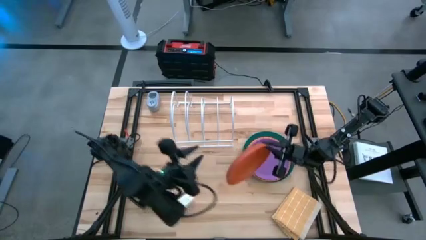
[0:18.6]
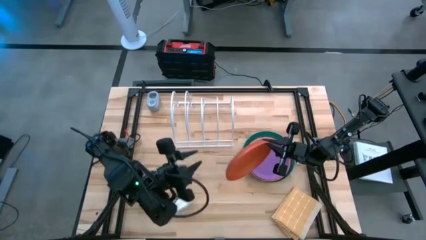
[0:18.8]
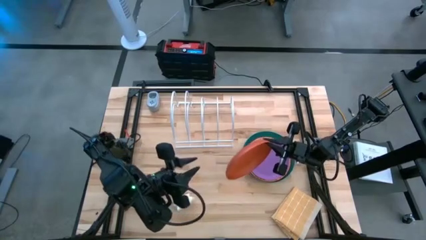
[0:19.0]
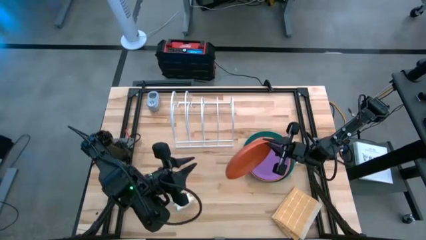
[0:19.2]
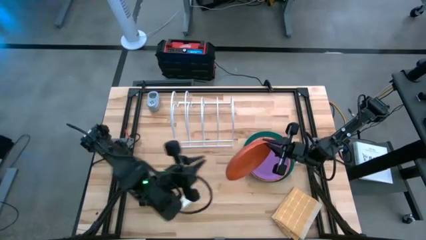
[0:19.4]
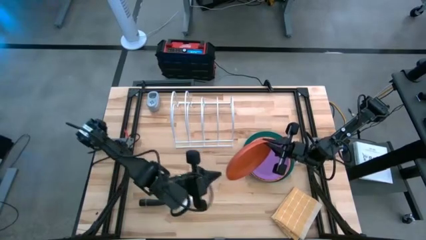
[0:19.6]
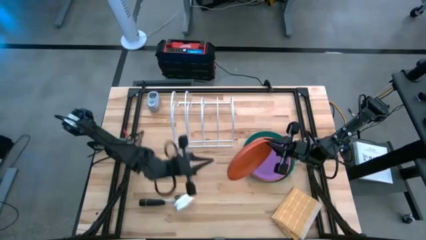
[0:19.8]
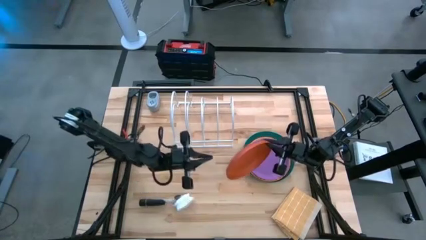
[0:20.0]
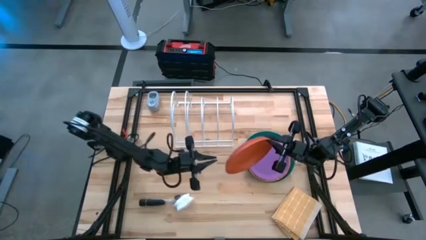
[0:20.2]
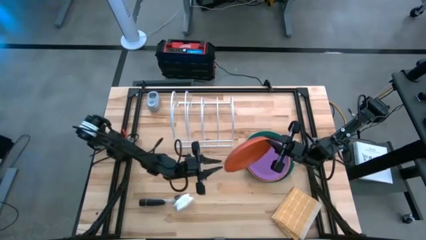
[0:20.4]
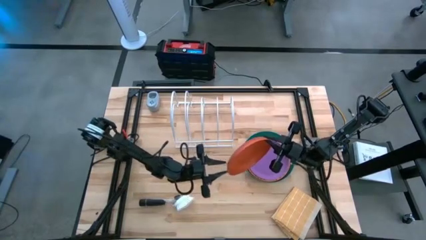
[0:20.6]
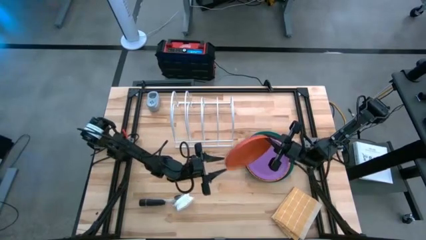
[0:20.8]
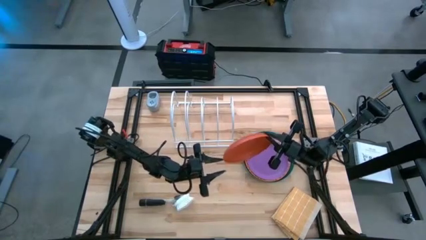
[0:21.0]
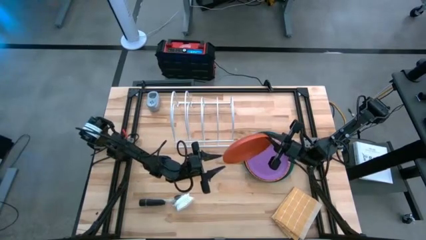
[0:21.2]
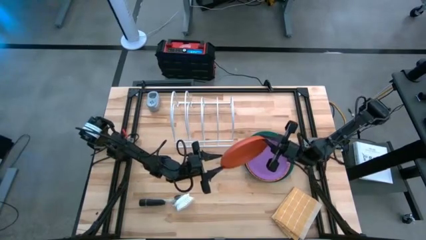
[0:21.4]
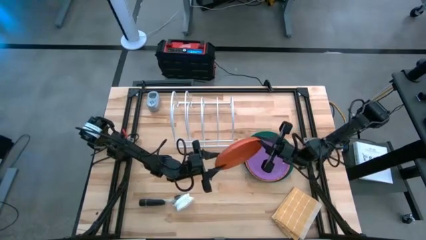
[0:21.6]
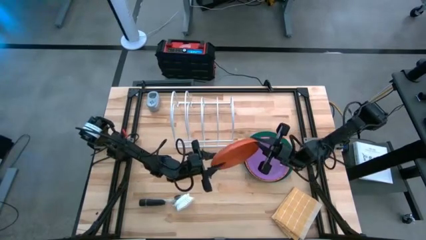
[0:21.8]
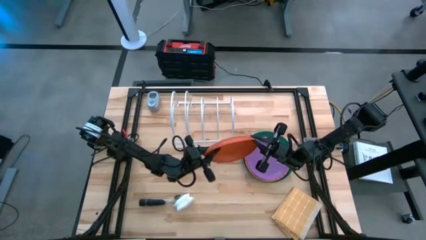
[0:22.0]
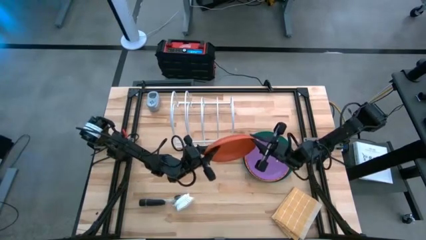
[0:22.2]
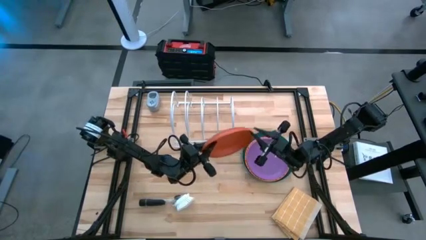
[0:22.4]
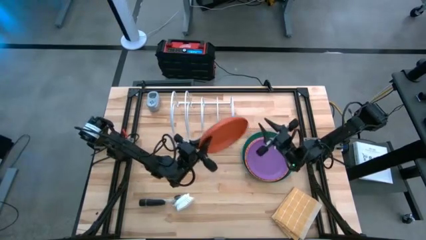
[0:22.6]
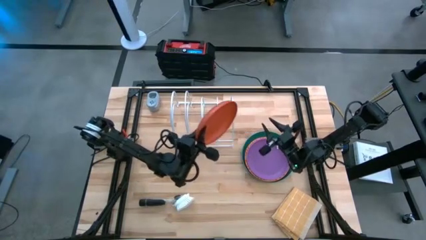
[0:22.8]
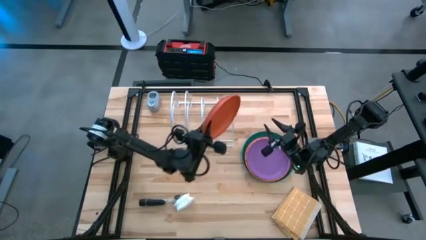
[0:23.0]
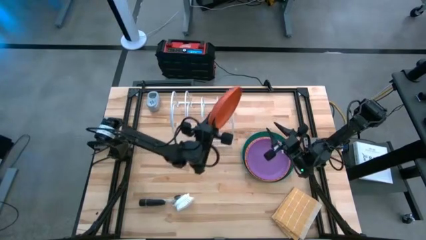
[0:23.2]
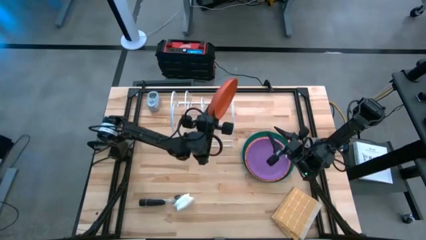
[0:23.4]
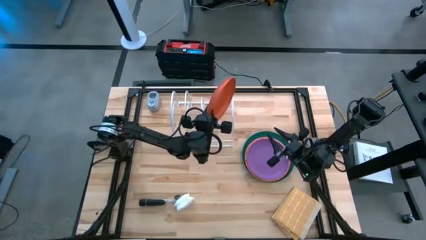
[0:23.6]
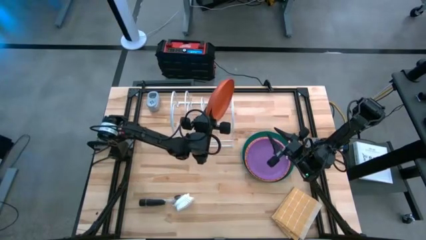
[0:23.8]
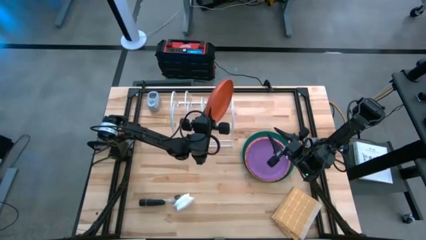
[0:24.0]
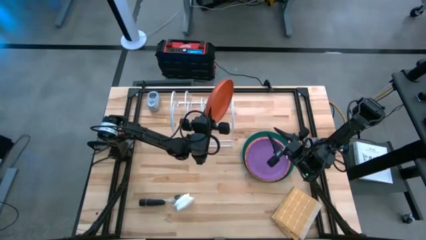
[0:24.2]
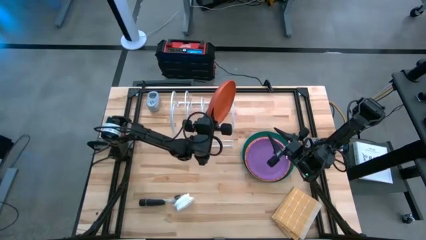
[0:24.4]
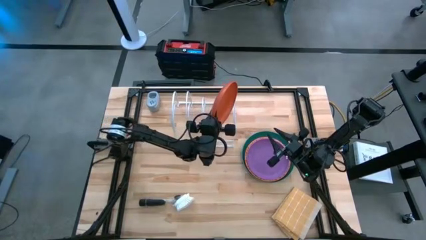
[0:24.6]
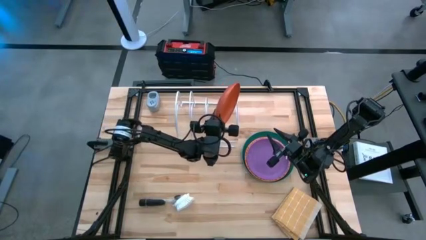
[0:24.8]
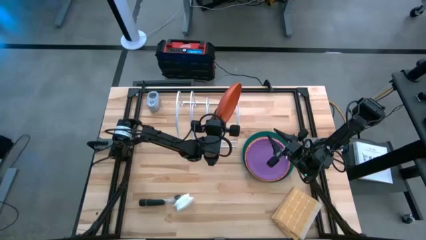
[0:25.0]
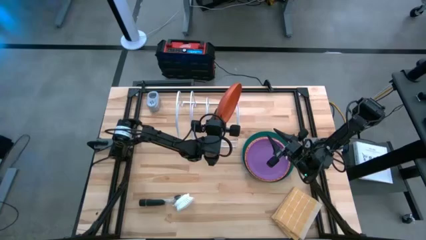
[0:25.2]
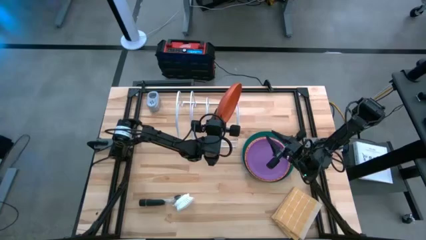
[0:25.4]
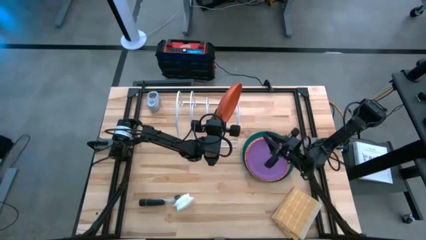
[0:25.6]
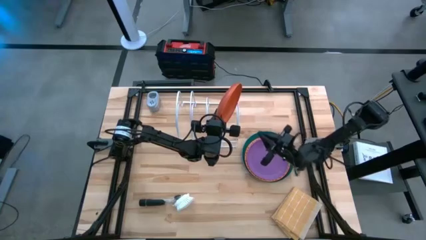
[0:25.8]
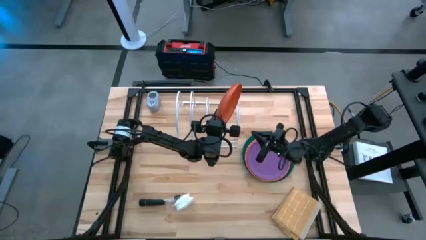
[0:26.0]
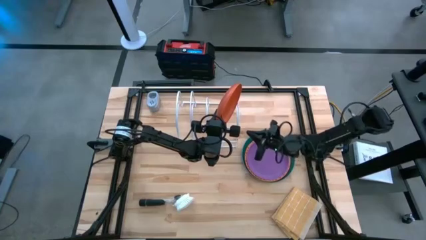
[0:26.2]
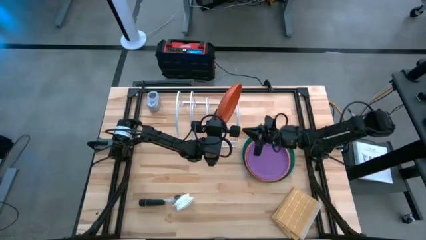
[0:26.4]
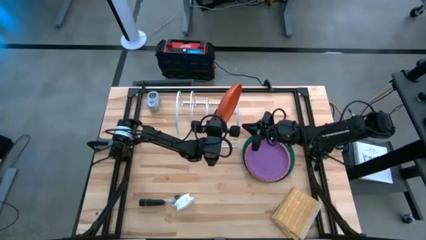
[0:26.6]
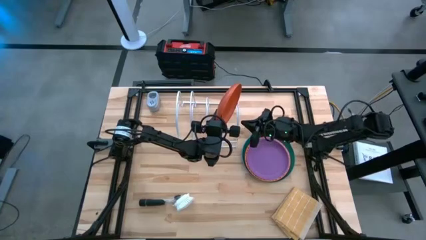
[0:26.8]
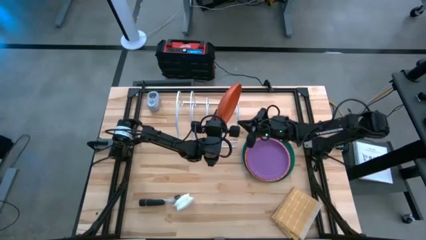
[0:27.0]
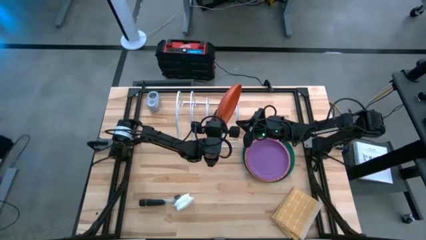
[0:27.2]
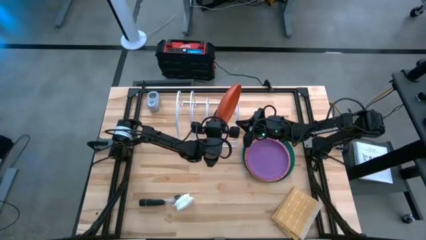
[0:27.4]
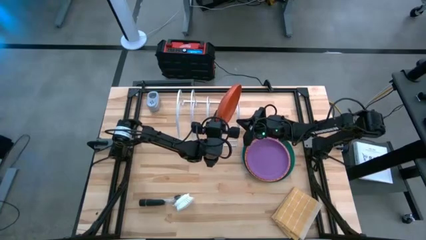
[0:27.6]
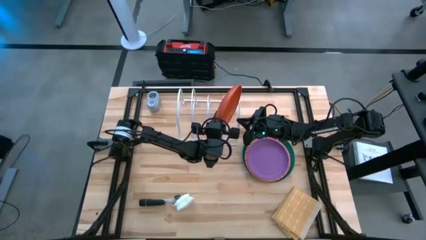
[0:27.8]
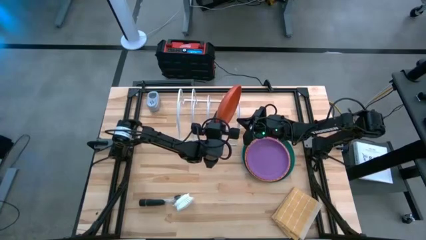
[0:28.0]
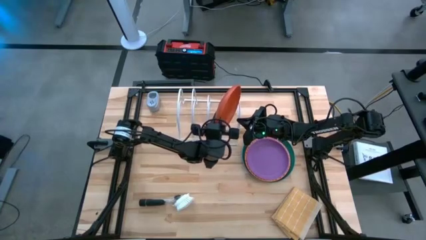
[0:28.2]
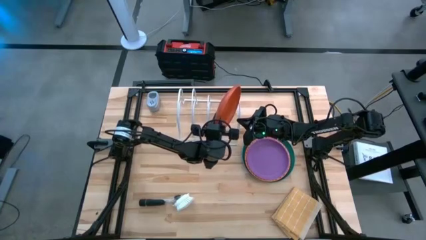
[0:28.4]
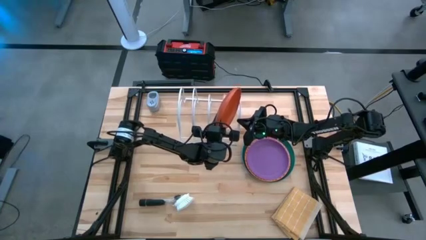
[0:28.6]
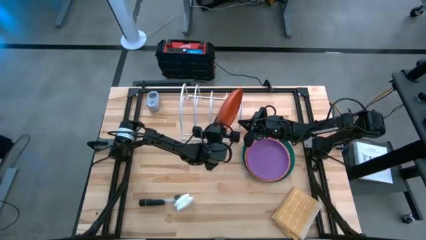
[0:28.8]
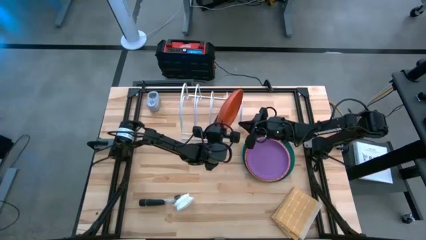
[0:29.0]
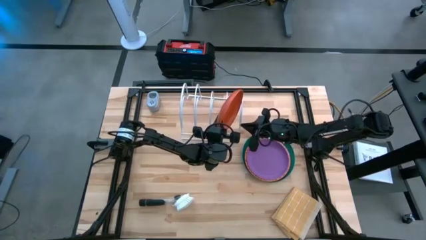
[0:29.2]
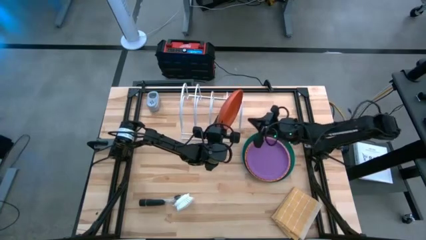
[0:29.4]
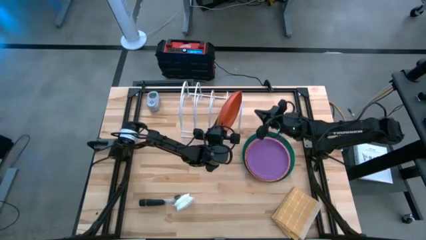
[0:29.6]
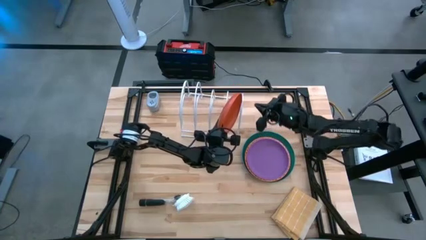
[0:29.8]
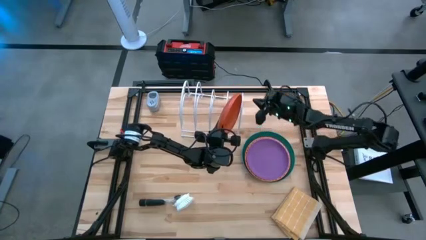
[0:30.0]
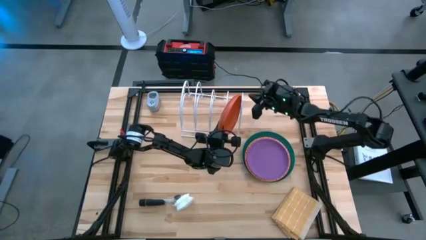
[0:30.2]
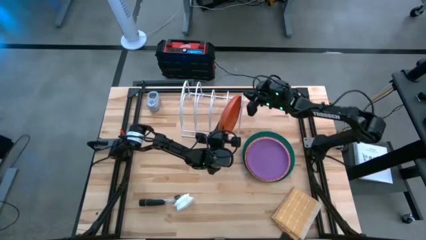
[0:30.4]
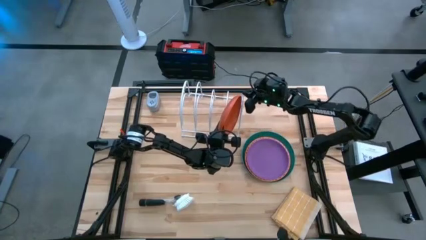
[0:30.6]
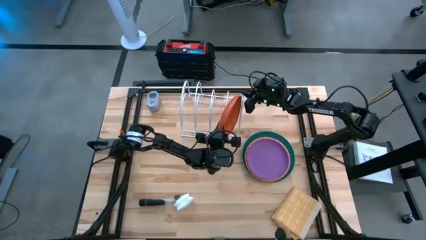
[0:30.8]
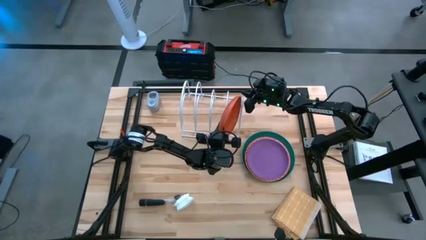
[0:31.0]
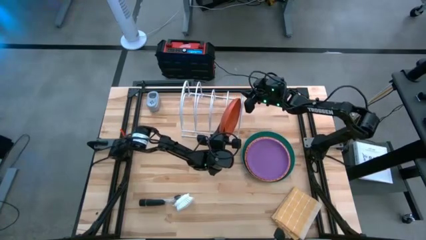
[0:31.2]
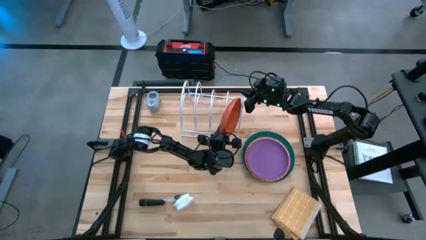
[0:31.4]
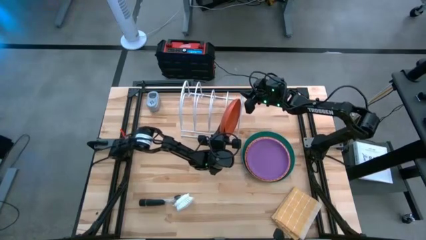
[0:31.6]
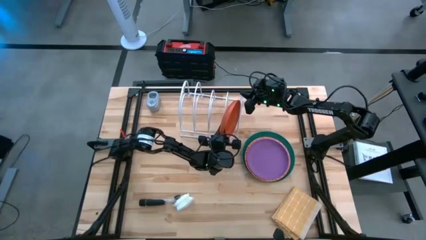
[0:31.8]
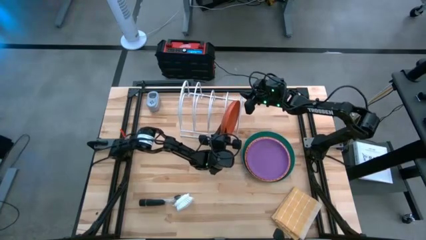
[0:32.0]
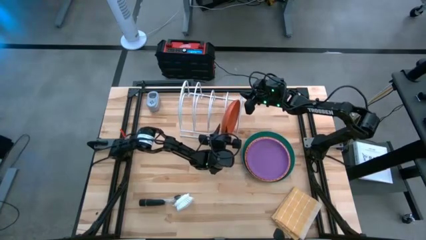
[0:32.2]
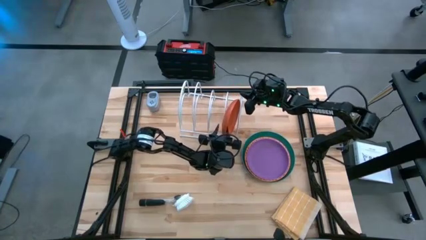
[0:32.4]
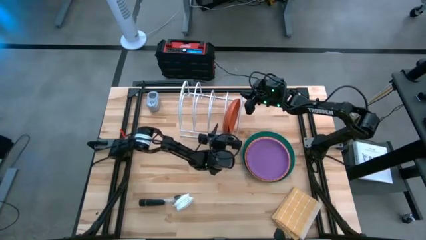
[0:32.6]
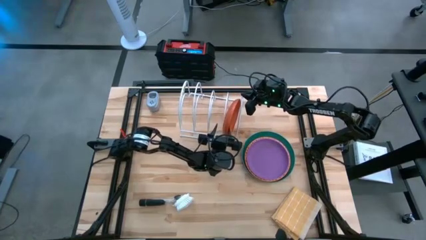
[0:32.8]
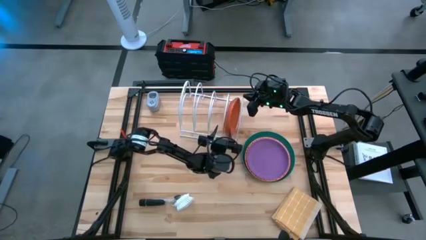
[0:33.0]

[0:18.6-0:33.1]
Task: Sort dishes
Put the orange plate into the dish rack
